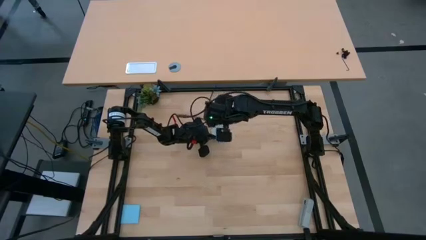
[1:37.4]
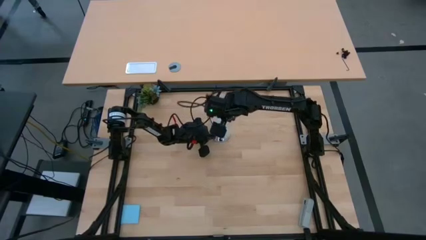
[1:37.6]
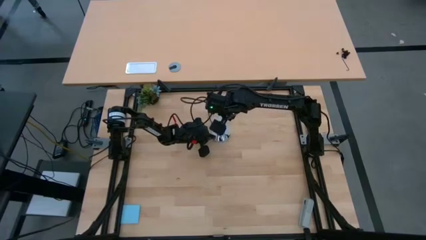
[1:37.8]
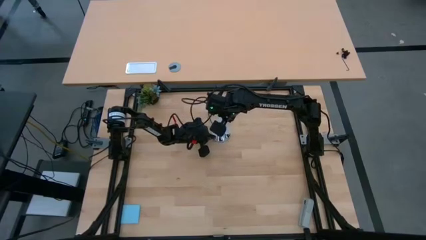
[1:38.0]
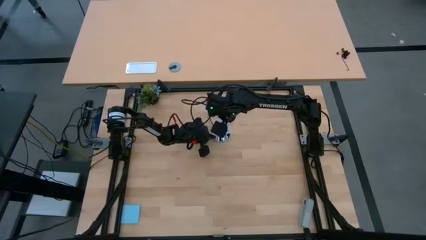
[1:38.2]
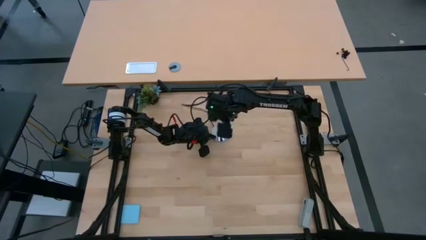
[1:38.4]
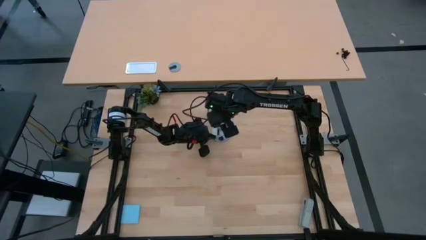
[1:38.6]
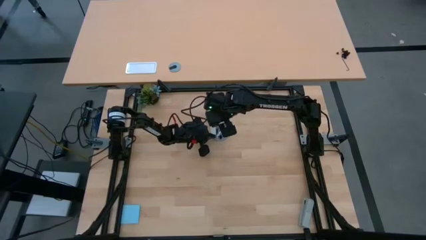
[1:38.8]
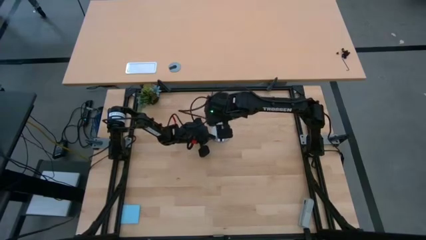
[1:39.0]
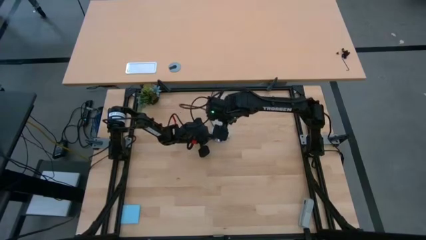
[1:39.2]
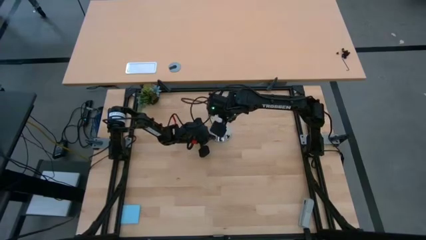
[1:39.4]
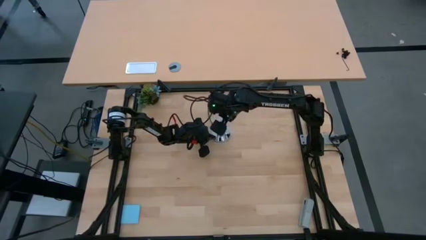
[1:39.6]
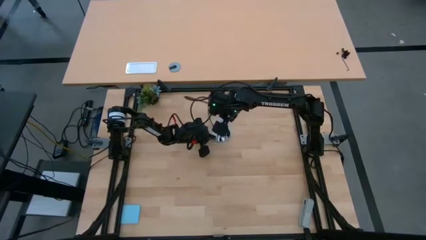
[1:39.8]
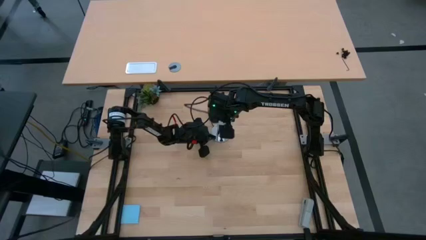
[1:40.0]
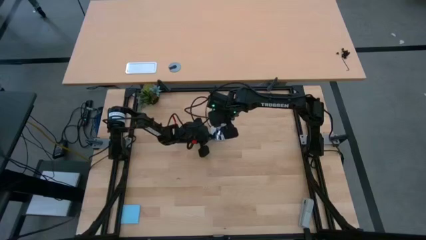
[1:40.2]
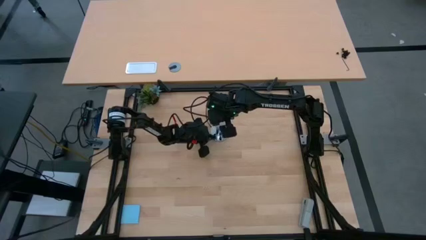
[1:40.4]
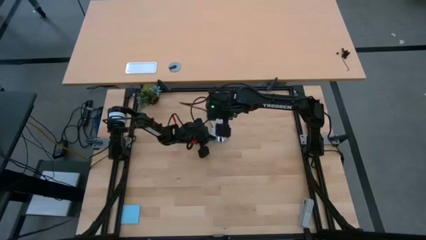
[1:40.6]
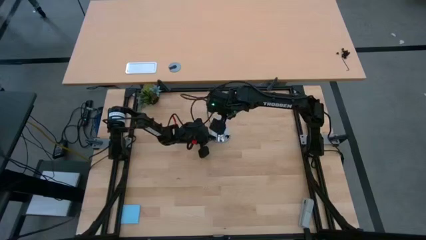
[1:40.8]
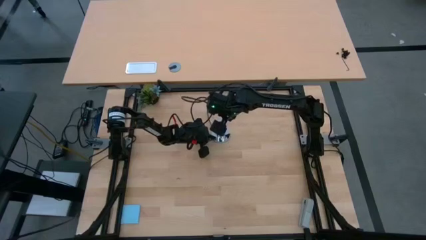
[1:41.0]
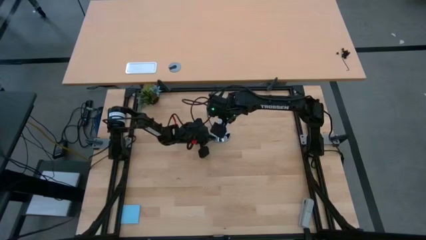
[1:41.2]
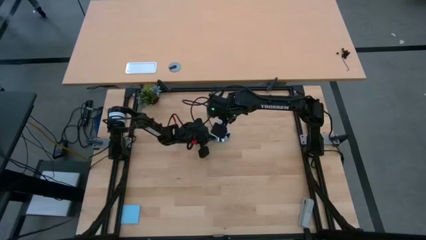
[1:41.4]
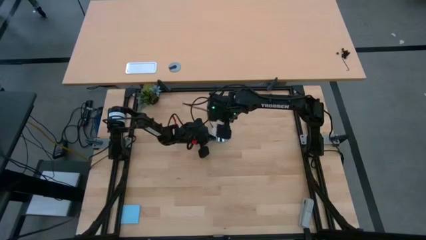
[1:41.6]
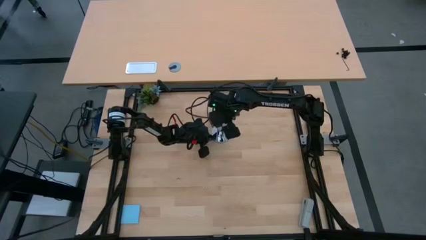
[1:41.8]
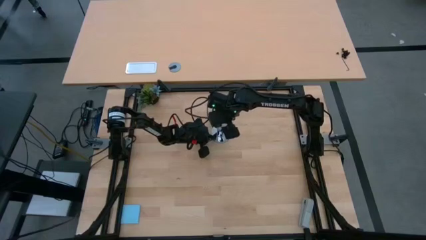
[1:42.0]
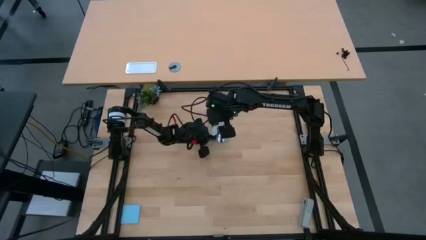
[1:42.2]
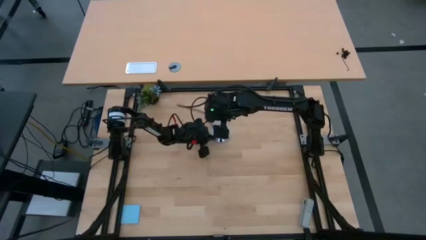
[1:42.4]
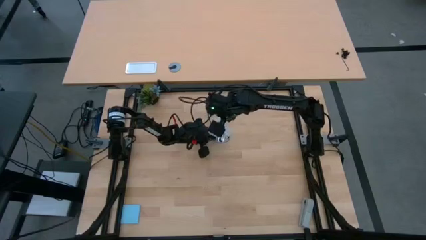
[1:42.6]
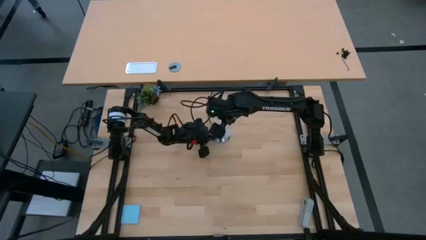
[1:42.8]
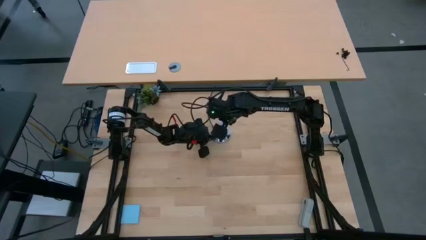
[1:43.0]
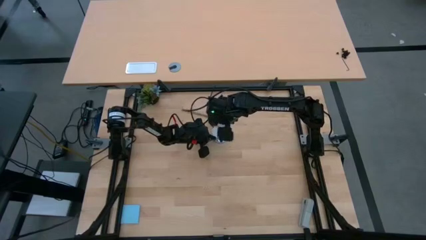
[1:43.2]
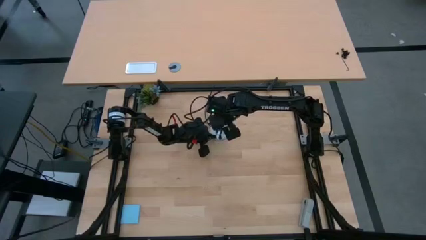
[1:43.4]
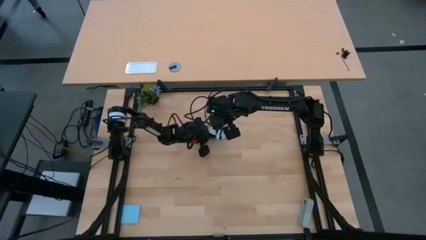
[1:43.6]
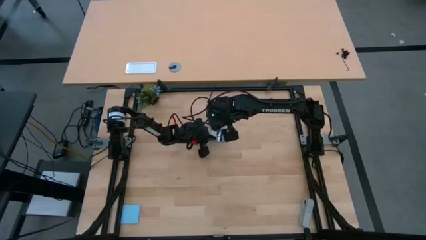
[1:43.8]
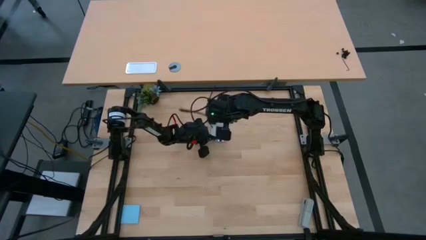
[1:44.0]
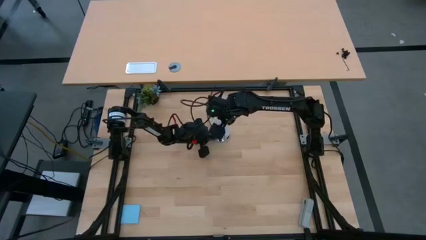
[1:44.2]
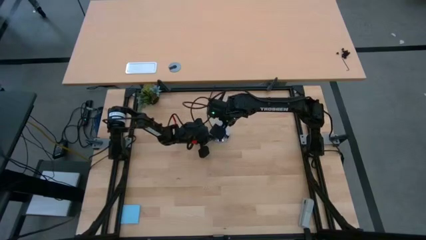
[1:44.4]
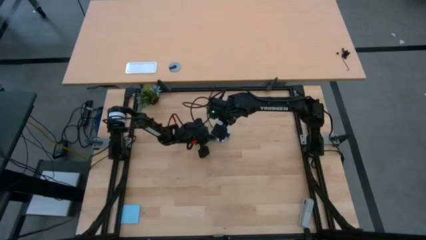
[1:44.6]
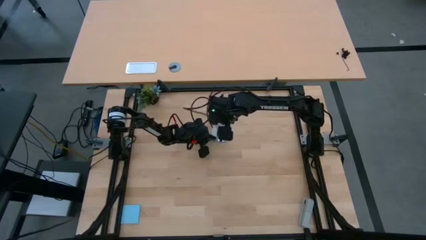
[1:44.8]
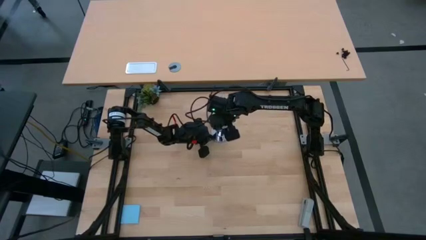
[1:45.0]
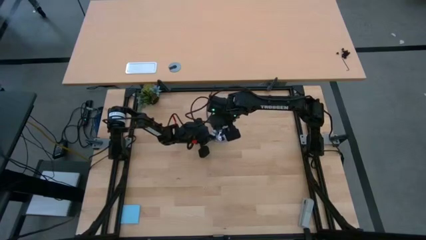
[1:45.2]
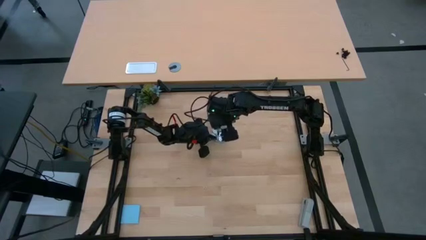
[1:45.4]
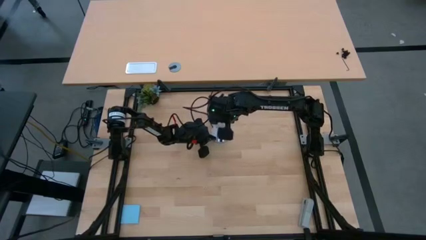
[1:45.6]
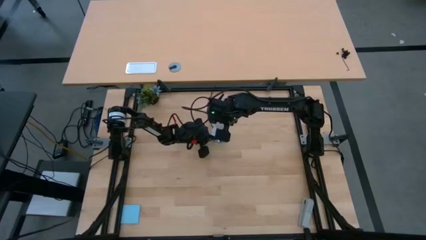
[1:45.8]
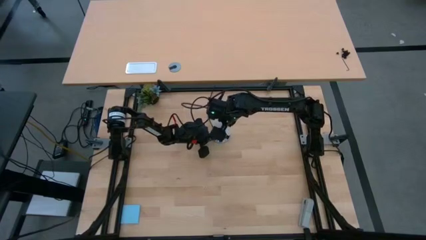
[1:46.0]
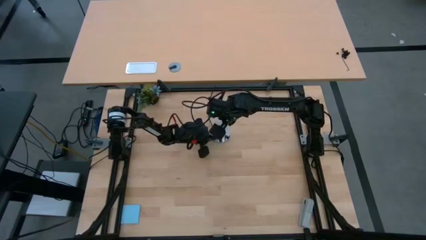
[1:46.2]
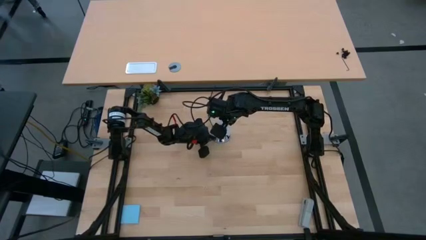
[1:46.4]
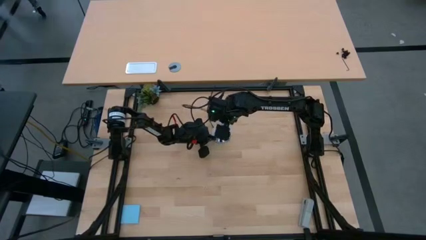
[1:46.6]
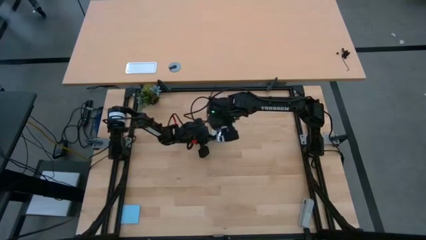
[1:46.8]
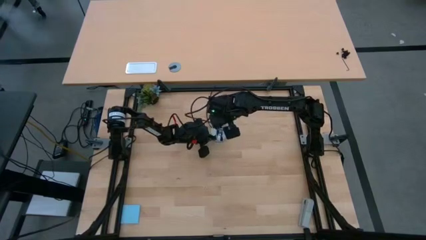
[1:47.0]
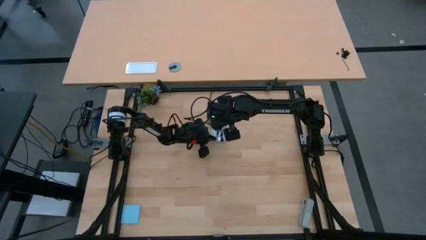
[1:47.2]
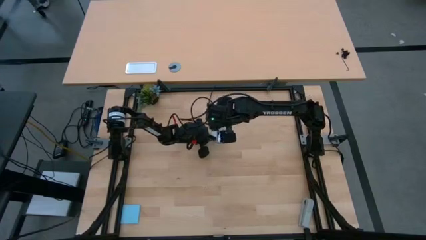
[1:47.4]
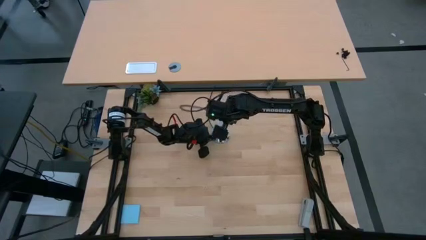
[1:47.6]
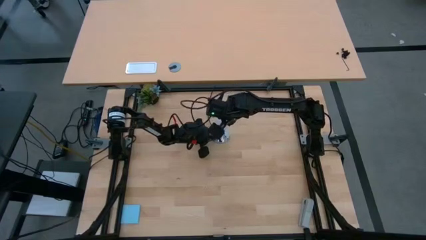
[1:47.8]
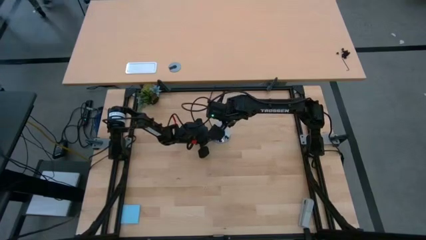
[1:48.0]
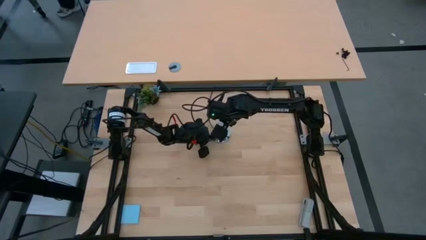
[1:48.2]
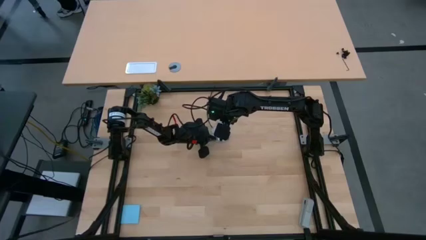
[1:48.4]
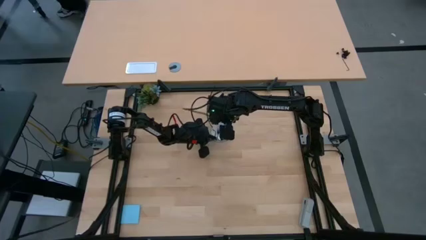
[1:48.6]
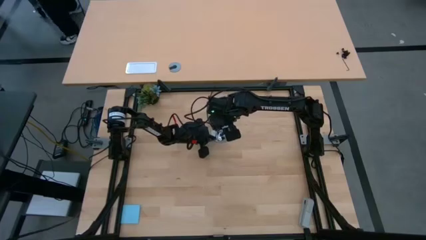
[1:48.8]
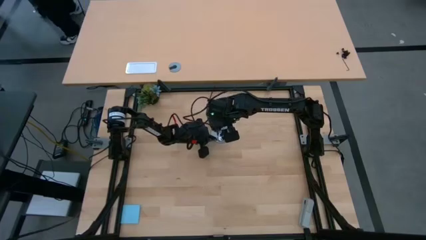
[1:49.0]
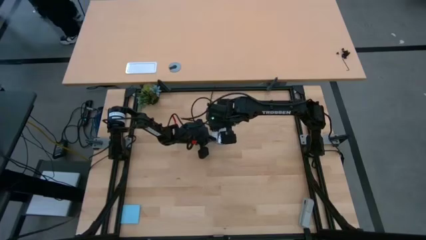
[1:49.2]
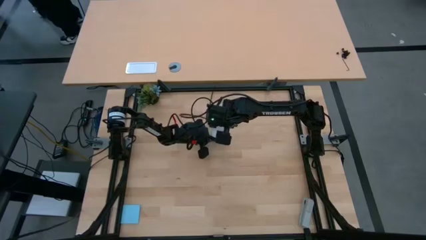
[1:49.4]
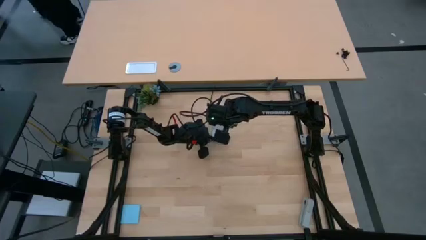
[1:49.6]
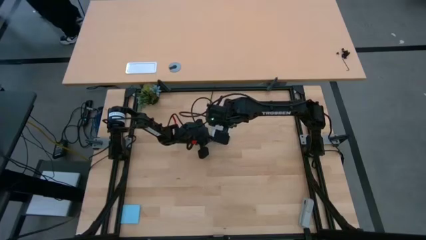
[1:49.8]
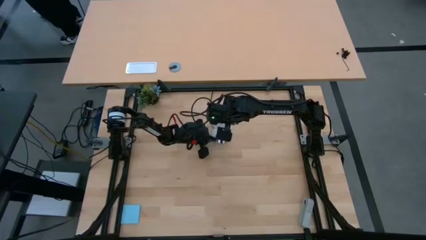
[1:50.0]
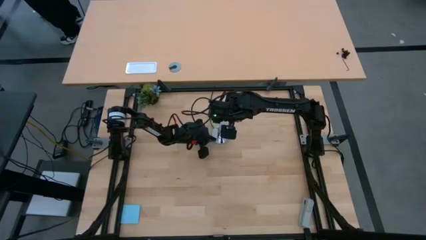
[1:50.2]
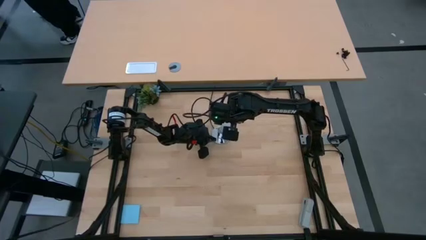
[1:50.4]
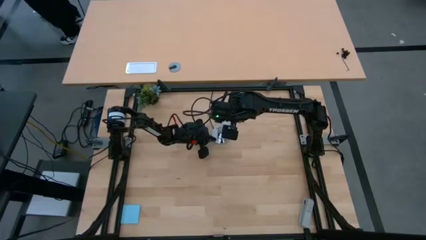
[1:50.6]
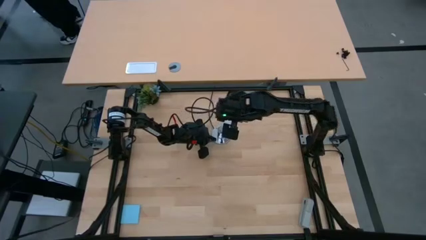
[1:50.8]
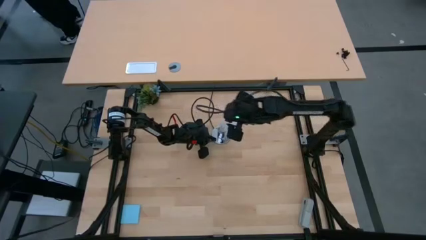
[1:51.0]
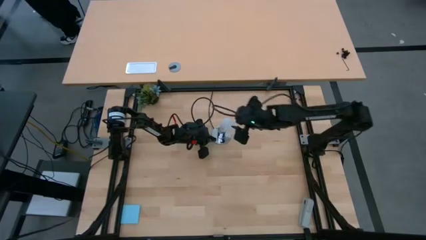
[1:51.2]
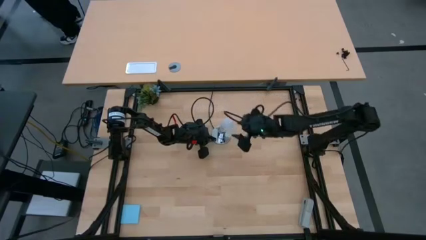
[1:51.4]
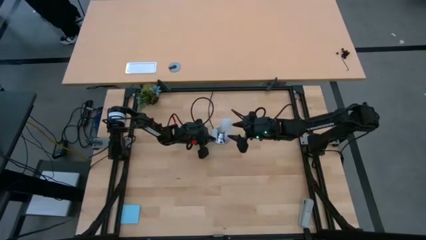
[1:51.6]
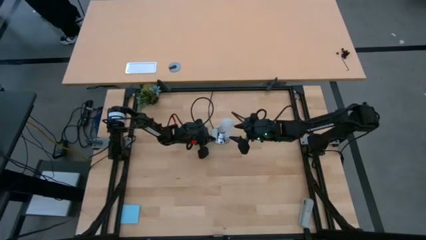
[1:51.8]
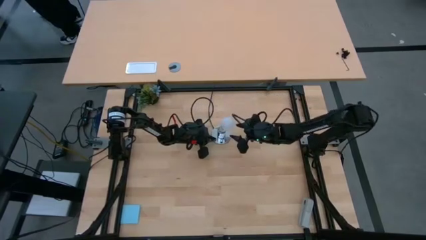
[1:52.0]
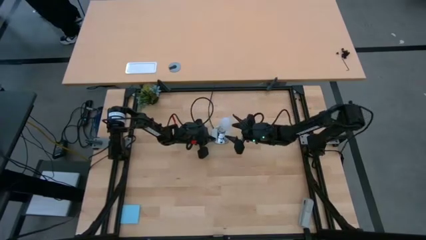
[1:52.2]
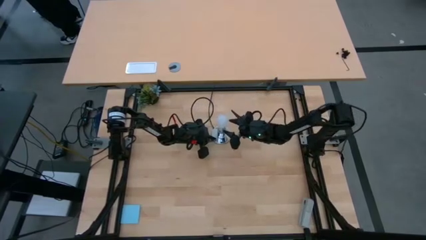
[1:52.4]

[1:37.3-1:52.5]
Task: Screw lightbulb
Remove the white lightbulb from the silver lamp
